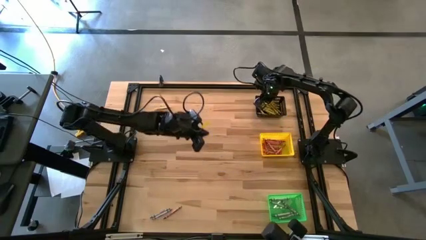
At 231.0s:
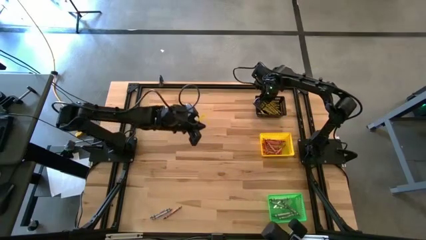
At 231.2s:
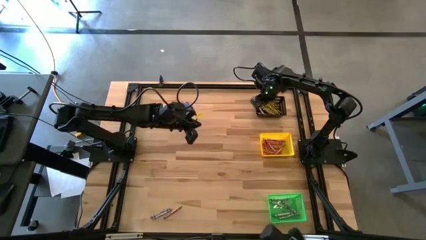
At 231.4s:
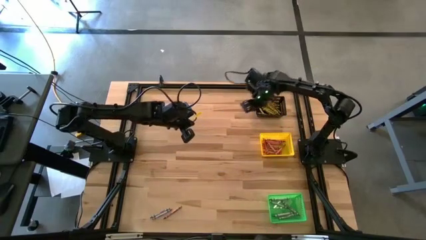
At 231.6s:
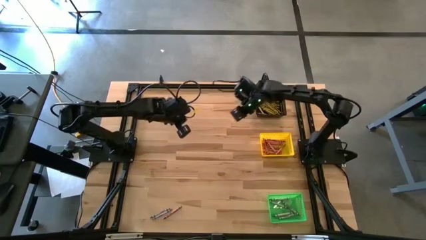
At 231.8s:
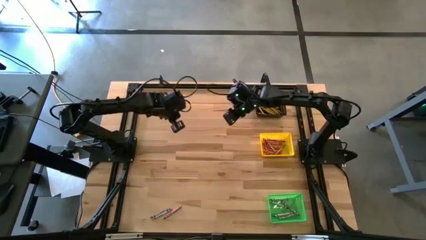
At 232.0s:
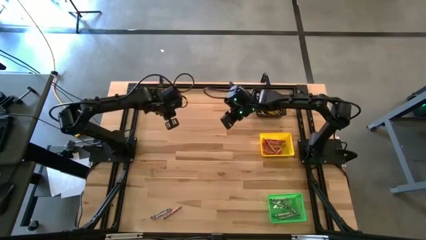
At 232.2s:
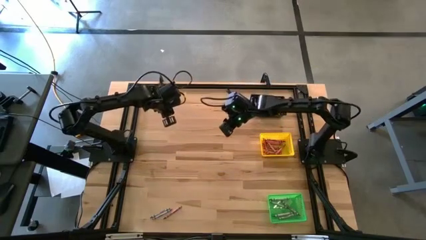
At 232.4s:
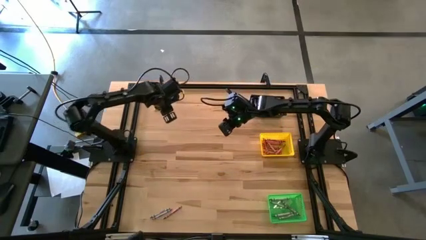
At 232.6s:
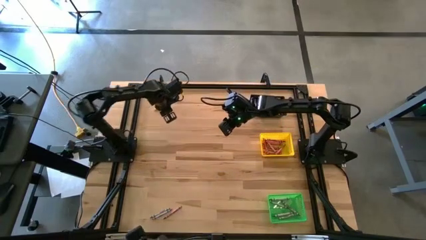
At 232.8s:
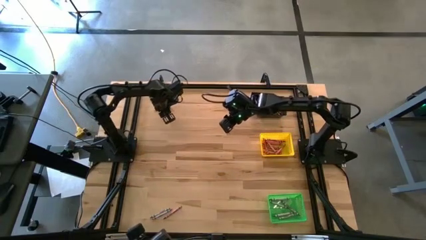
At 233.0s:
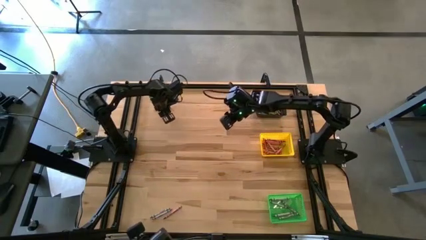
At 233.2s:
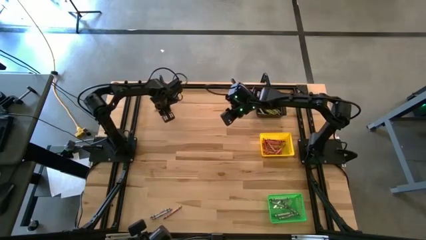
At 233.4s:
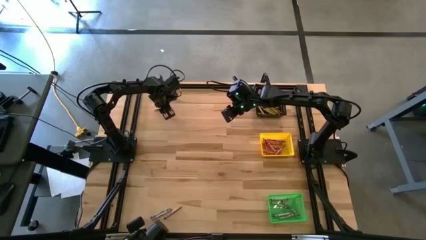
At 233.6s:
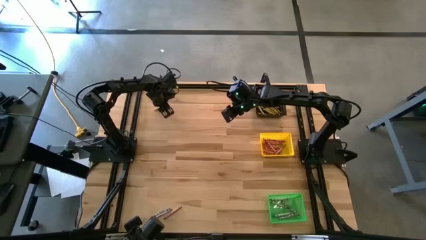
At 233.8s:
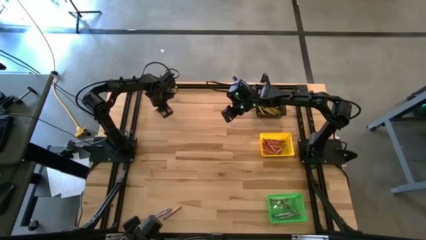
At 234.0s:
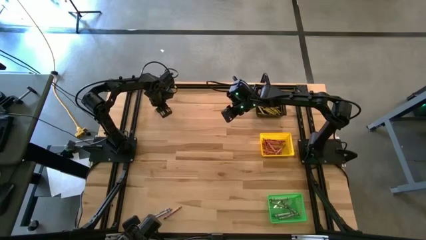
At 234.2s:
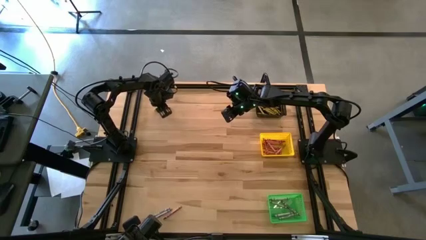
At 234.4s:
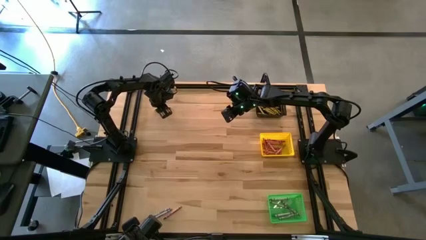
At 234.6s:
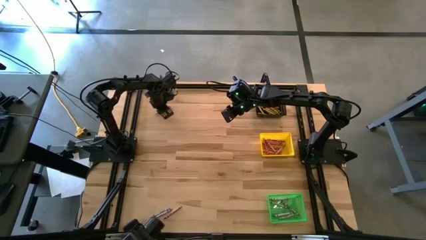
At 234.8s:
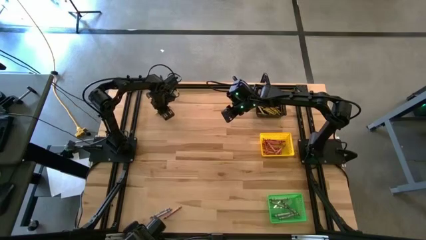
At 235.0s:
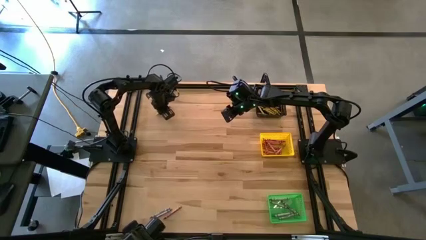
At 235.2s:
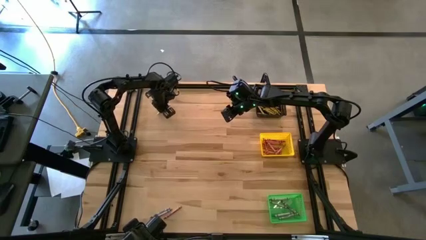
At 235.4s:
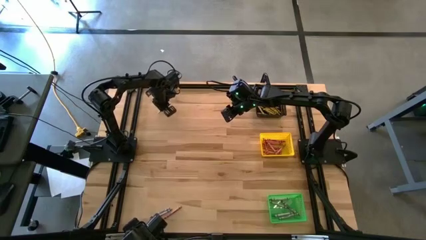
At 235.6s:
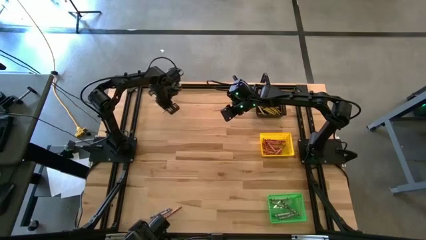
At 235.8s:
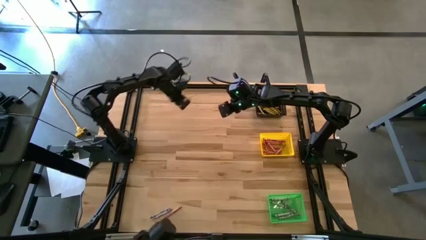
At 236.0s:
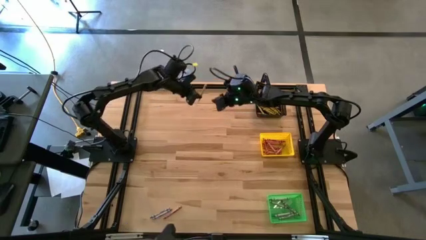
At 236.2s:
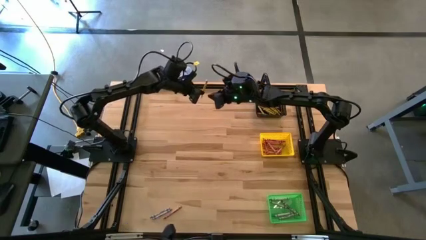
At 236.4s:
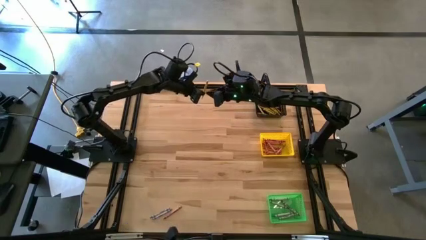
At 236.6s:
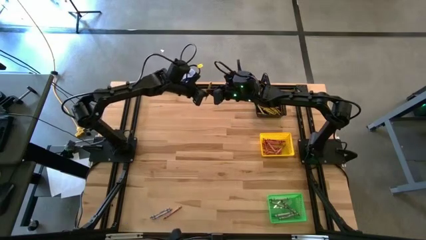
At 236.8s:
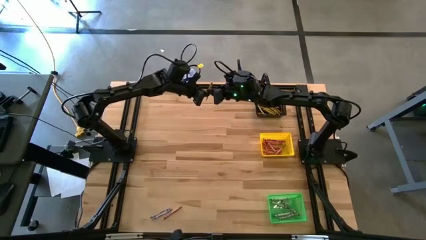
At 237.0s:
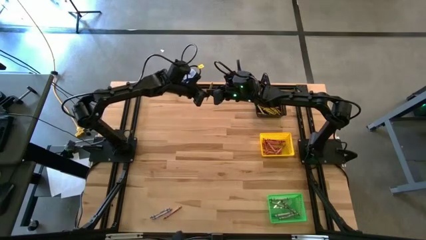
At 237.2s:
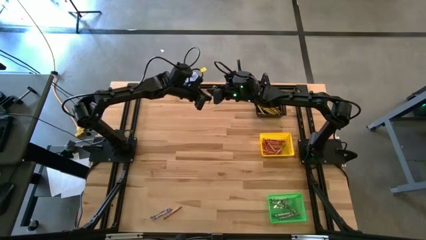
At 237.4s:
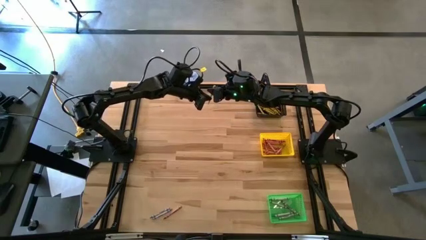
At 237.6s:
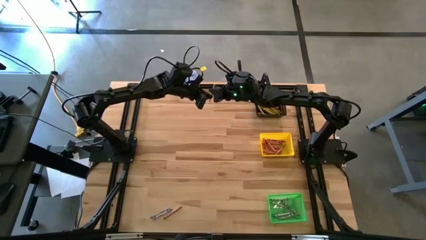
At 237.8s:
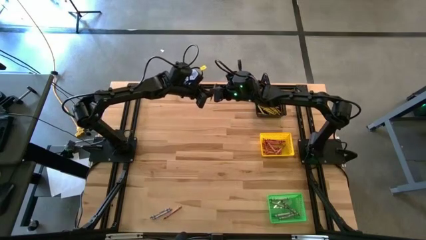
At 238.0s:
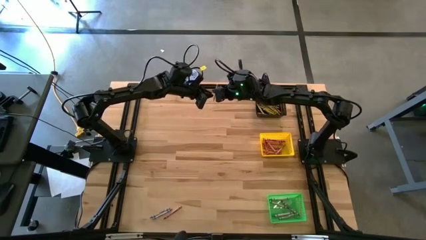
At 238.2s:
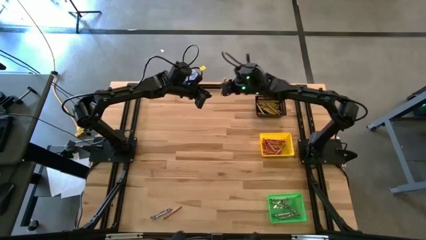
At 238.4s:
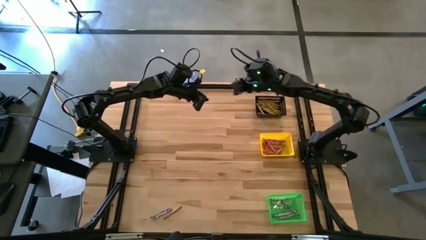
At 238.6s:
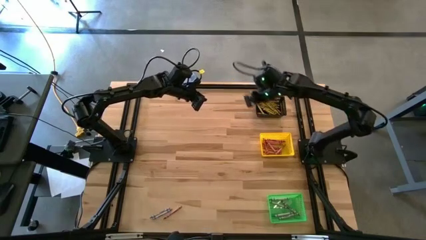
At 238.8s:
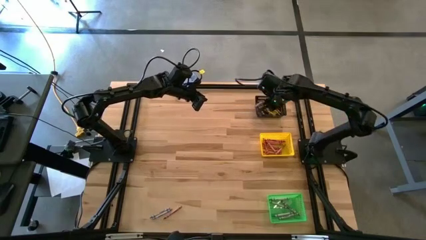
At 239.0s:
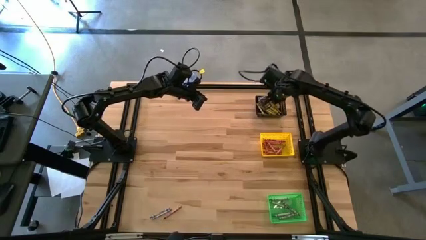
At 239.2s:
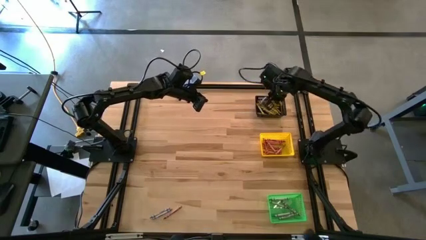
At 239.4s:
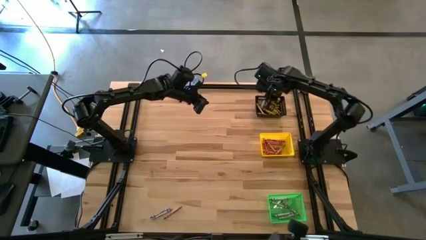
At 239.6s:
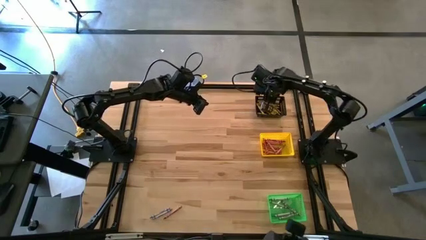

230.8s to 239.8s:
Task: Sort crayons
Put the yellow crayon into the black bin

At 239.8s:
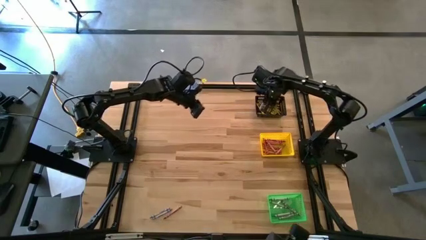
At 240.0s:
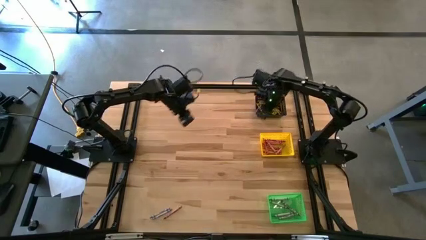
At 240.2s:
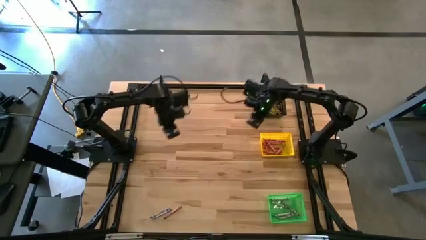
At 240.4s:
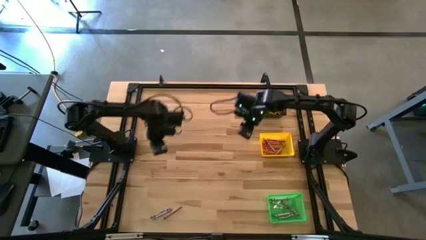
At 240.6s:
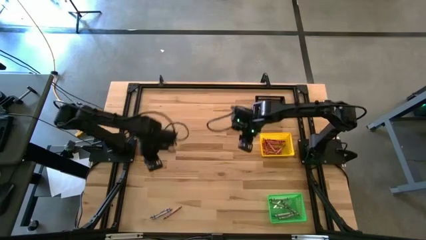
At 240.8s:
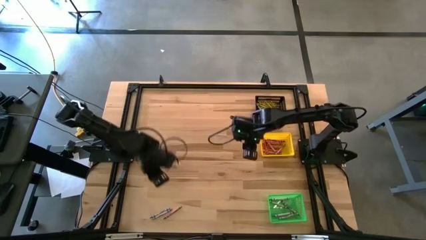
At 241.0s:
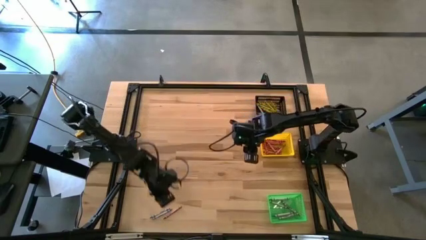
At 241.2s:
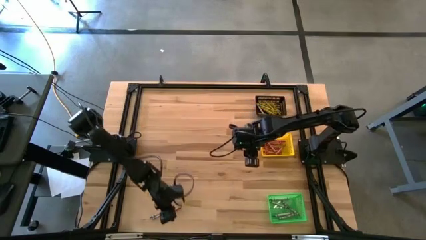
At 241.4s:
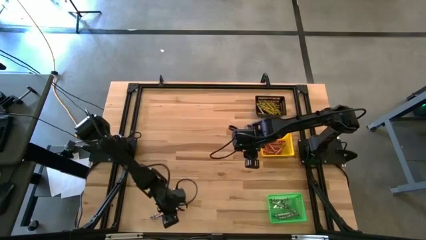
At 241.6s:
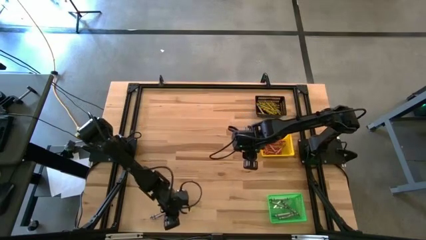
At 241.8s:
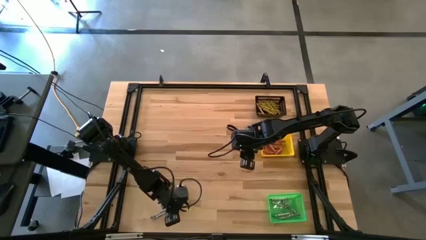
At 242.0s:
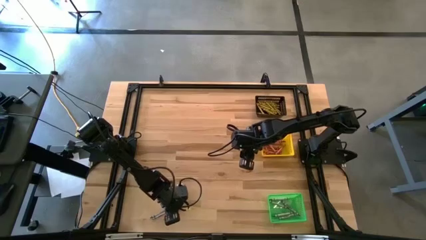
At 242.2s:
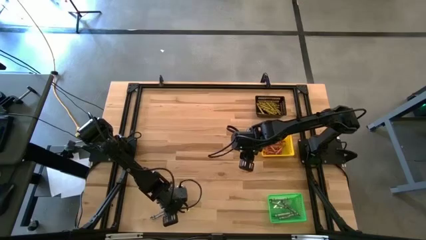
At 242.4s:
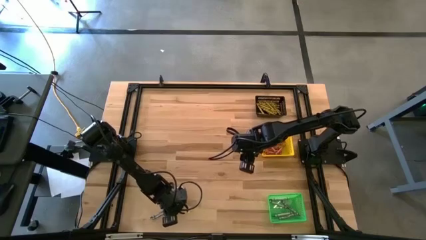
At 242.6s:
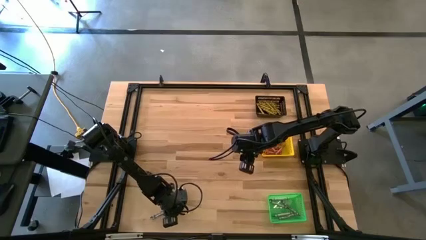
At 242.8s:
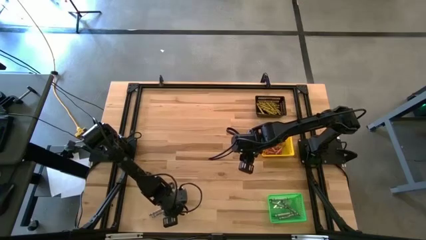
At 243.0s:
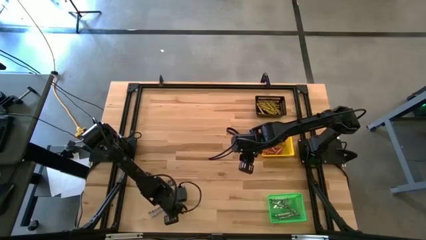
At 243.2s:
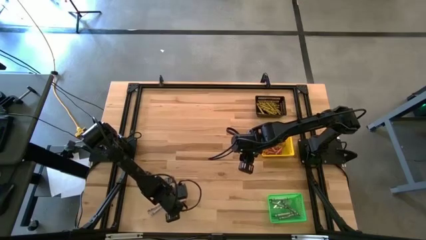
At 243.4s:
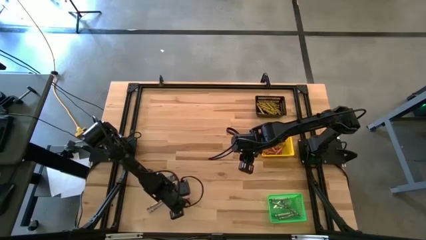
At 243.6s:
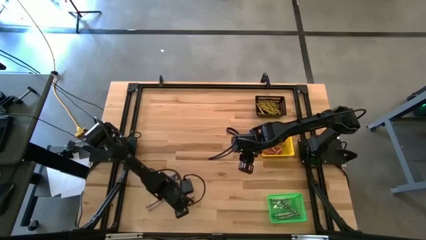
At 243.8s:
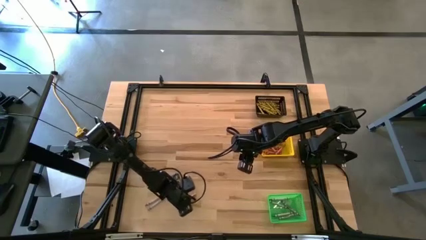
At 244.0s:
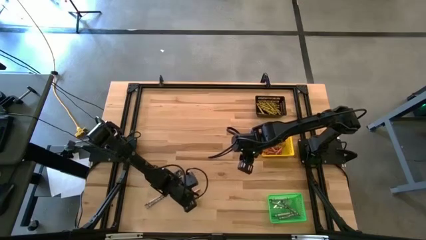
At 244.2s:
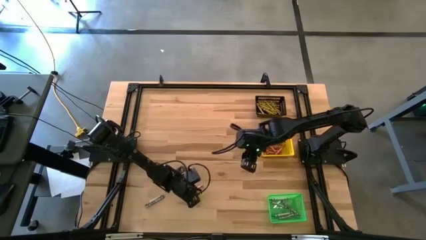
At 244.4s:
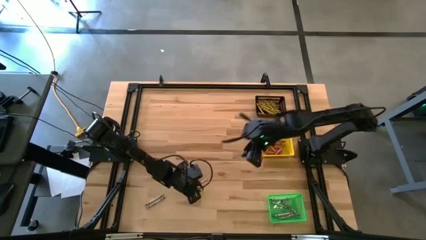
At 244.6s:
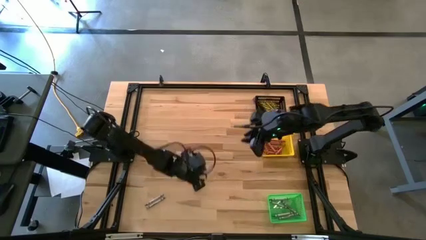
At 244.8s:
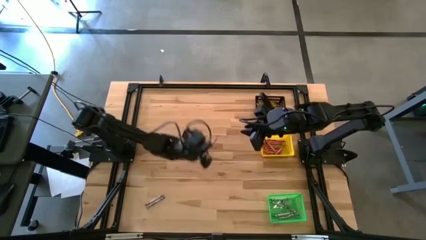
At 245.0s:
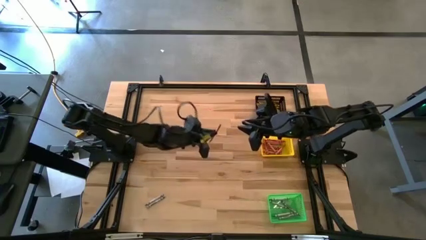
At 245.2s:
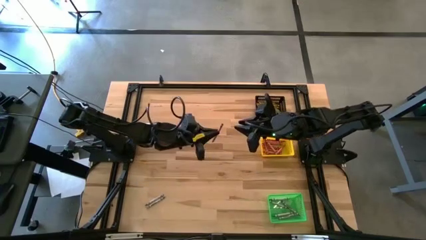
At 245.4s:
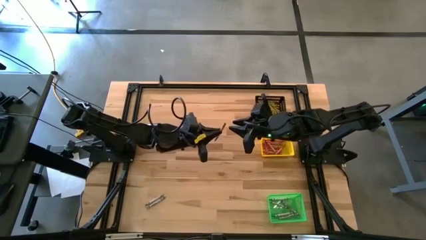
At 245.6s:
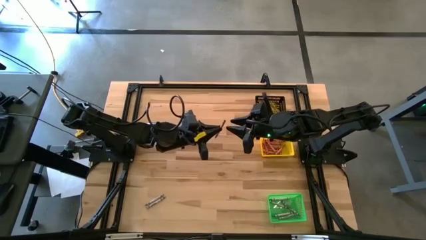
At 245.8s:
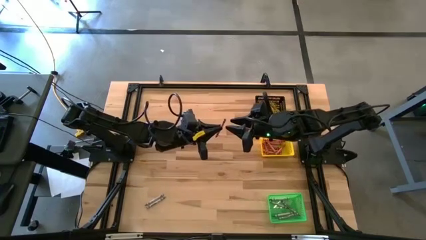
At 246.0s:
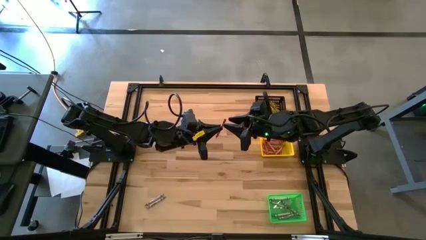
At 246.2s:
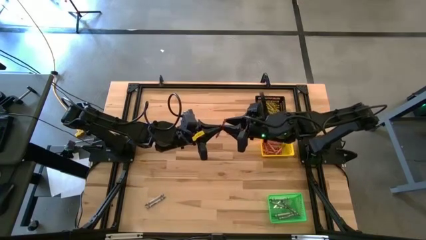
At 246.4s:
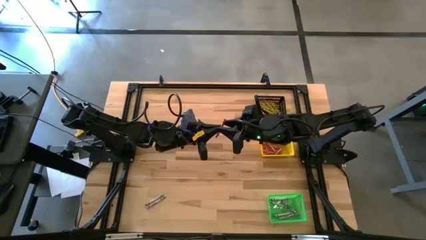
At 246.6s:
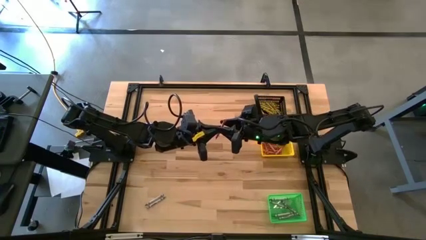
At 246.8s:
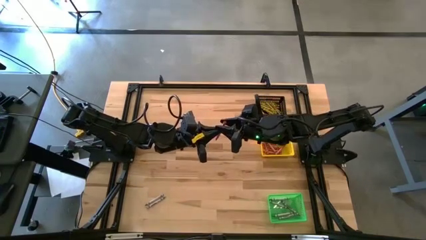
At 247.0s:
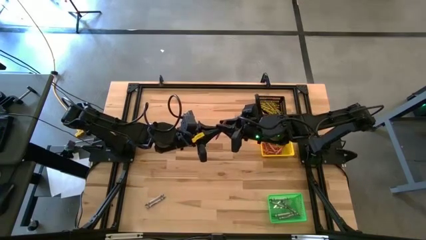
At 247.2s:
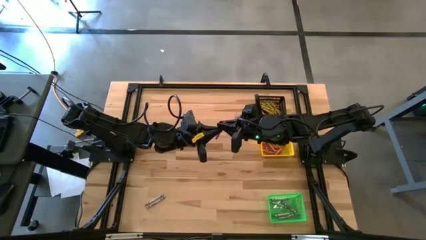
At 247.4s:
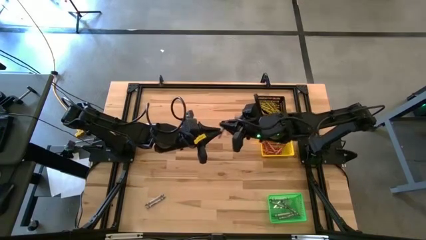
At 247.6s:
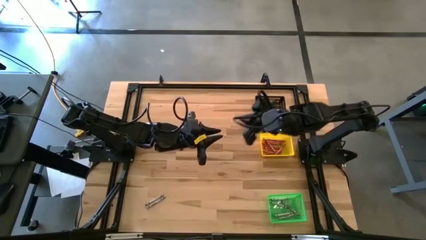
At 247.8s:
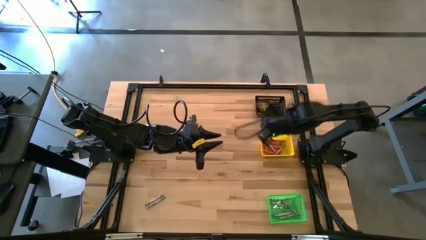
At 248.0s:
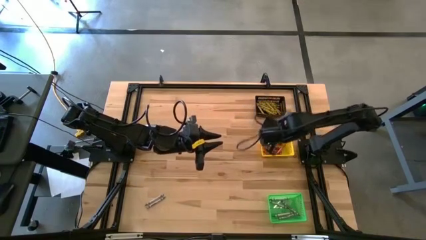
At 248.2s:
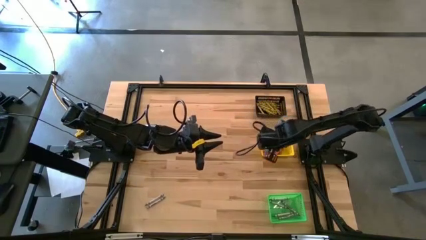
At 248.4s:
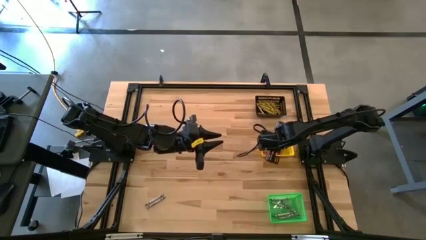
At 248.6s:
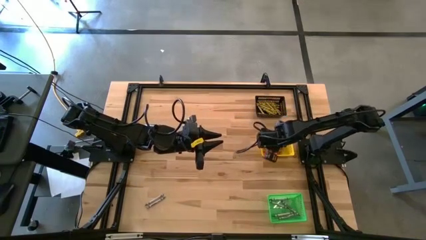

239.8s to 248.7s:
Put the red crayon into the yellow bin
